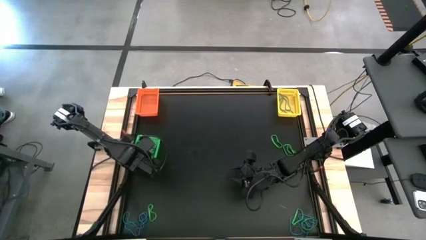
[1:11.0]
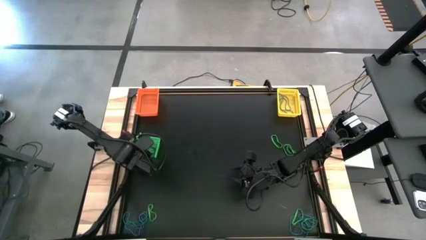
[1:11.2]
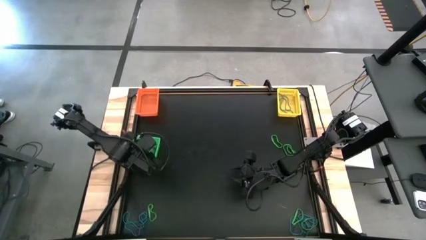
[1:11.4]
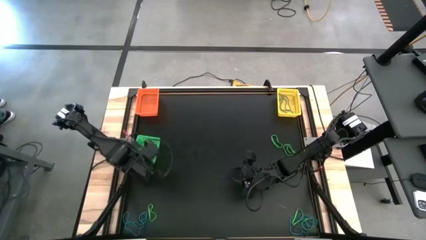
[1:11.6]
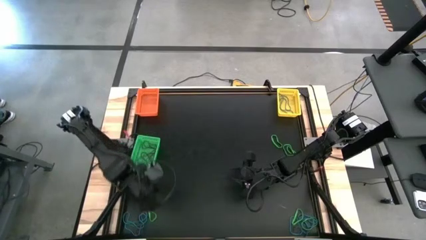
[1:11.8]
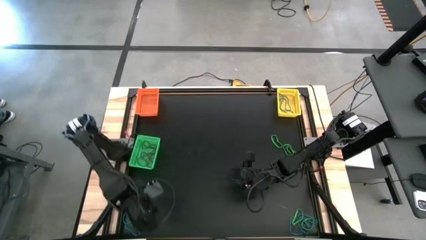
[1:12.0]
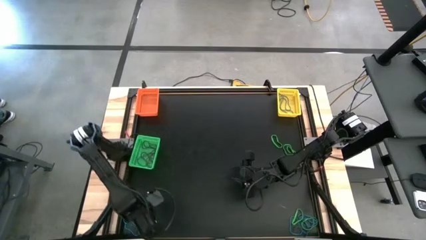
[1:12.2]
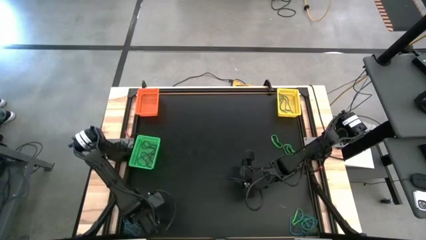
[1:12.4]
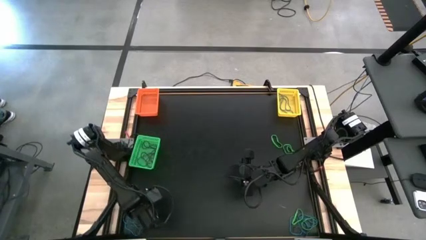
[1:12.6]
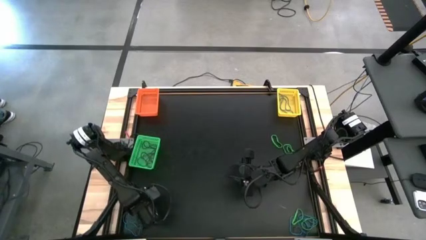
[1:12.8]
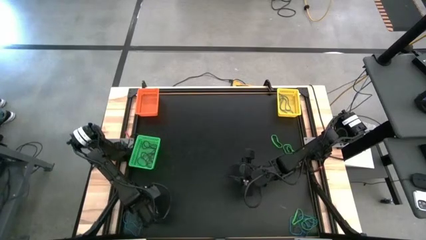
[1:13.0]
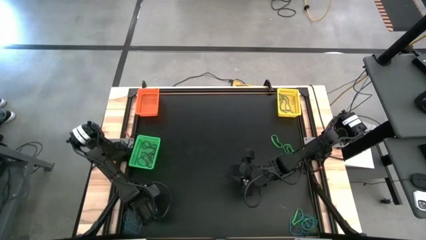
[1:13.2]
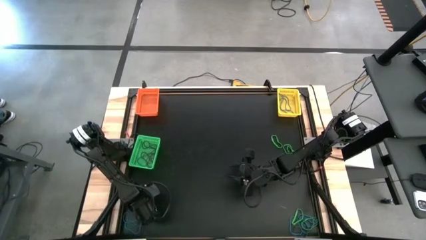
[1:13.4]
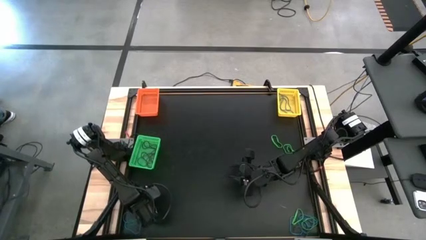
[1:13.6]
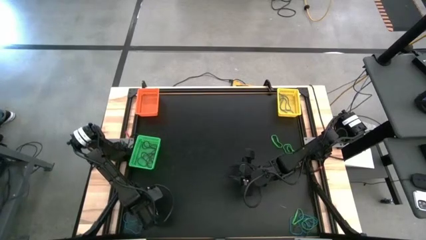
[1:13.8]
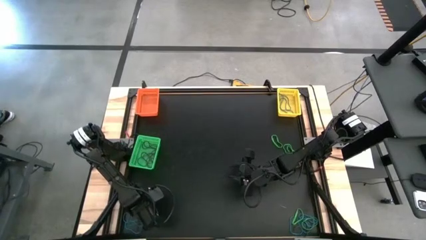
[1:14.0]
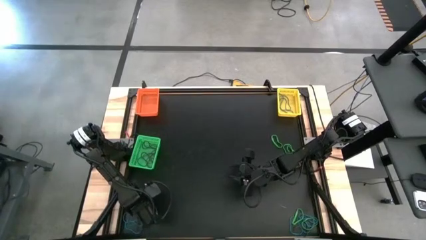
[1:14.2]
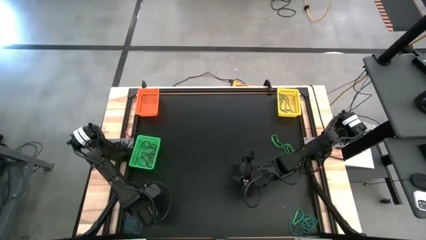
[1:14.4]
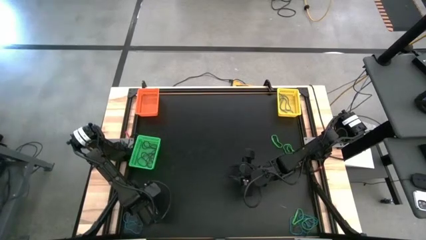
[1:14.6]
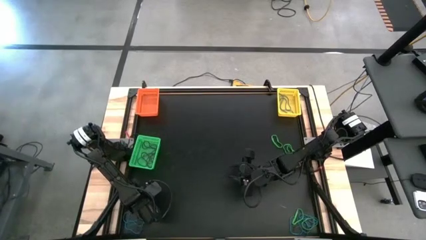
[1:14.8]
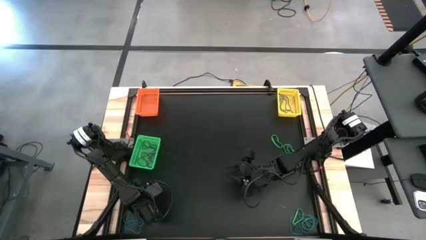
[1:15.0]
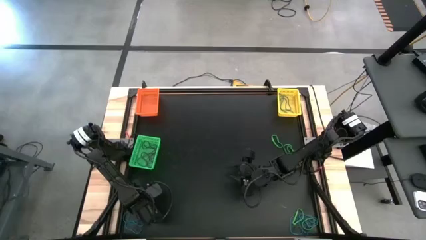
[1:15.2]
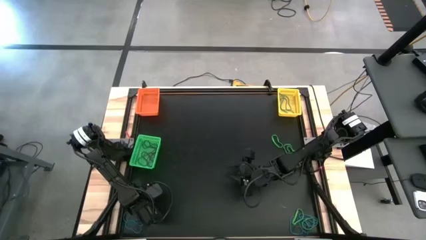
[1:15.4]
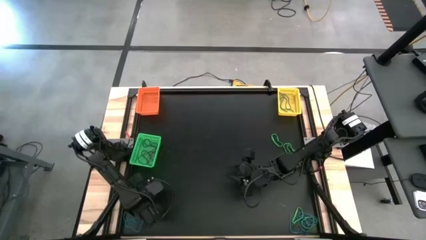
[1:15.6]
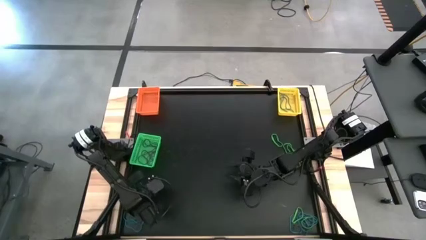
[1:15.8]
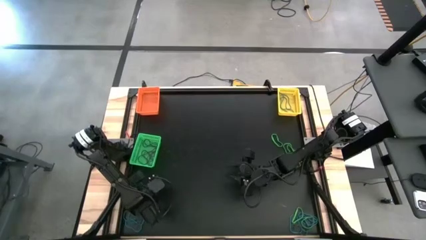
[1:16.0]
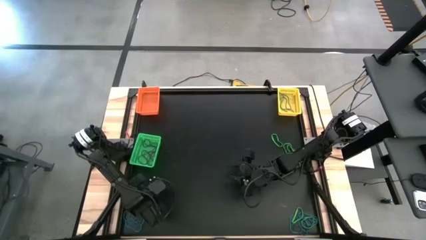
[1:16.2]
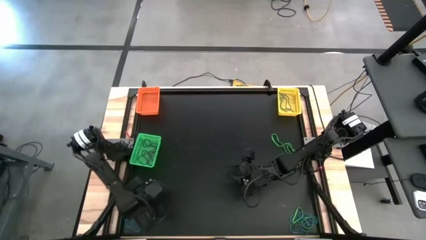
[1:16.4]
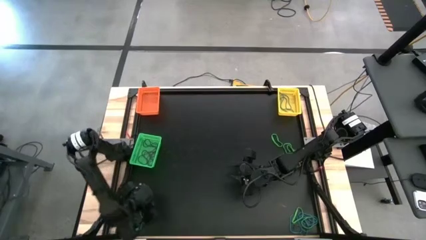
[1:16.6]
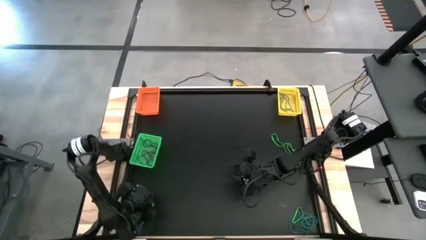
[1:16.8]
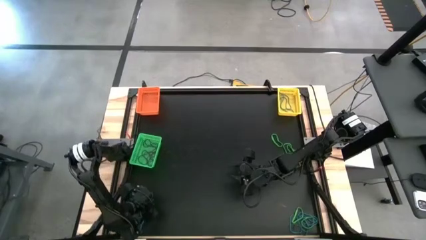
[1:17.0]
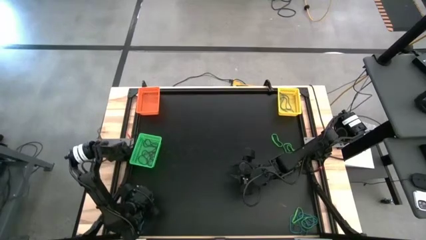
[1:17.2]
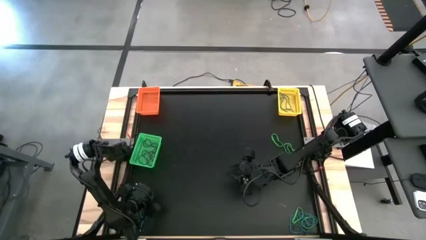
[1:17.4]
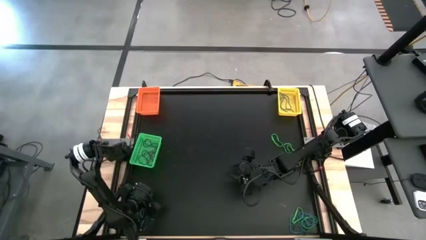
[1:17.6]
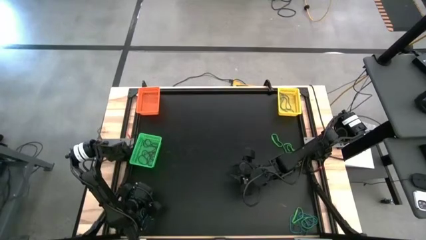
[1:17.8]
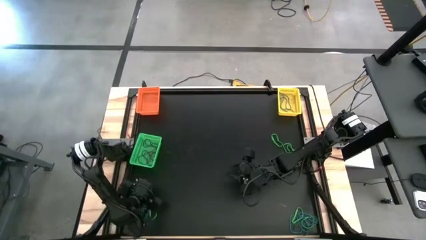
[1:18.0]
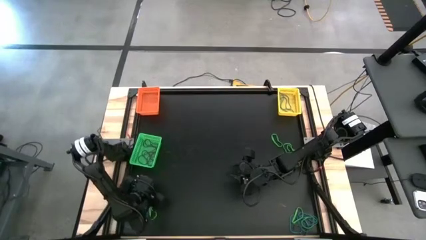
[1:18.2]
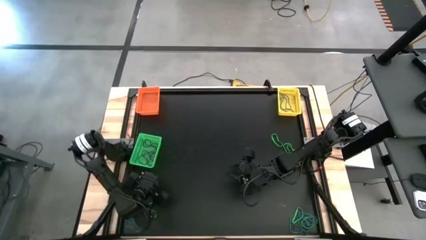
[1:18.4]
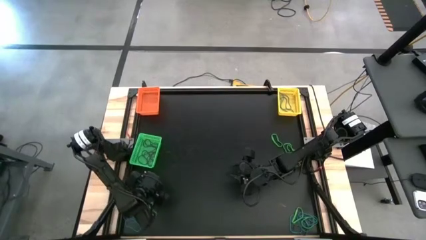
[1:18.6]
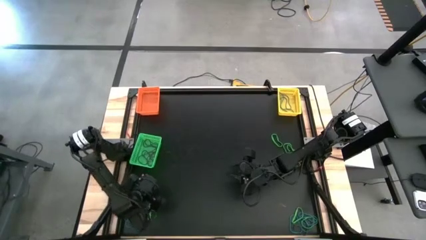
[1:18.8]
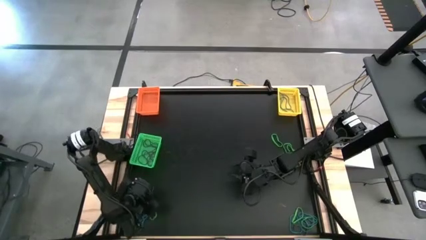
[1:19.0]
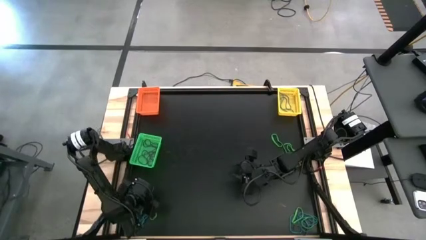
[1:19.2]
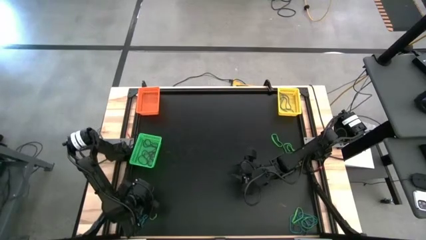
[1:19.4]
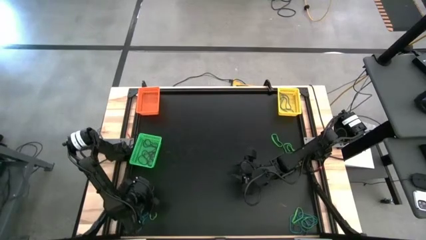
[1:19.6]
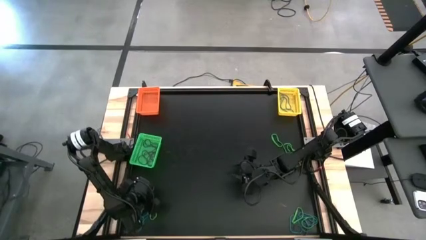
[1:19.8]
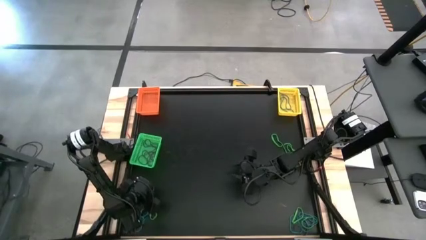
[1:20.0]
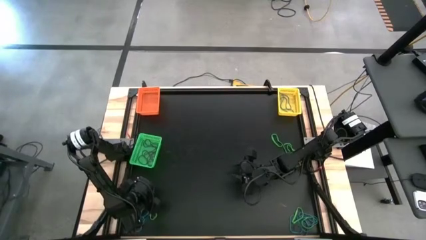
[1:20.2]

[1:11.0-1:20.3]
Task: Sort rubber bands into baskets
Put the bottom left violet rubber band into the green bin

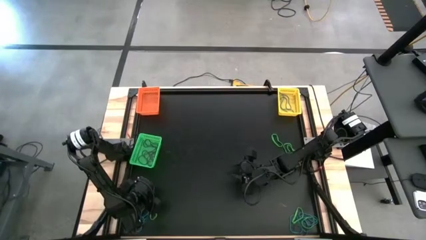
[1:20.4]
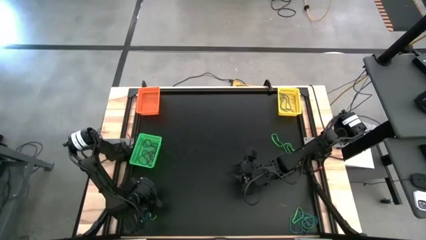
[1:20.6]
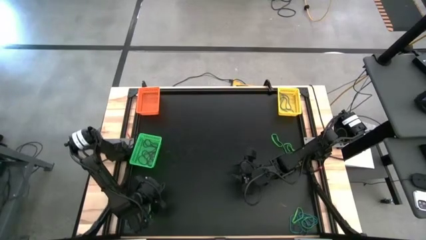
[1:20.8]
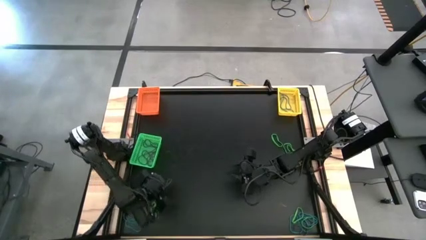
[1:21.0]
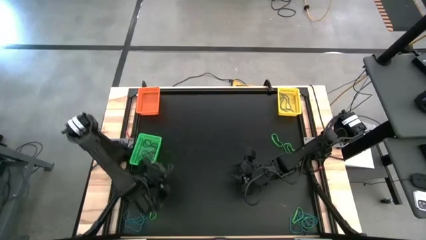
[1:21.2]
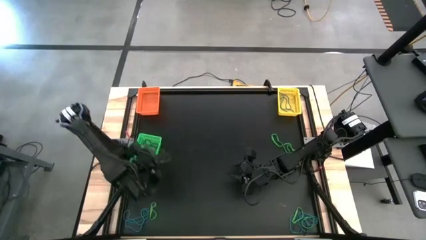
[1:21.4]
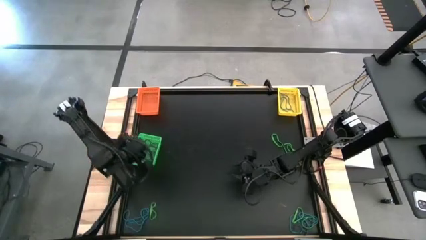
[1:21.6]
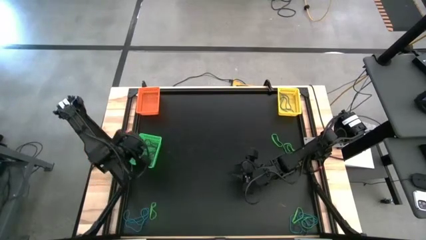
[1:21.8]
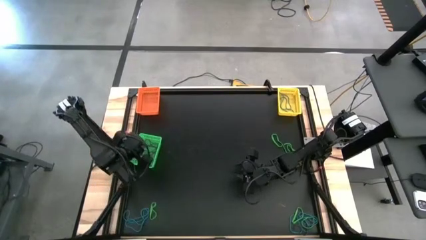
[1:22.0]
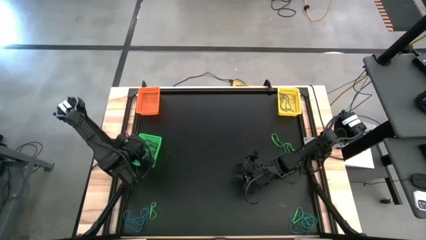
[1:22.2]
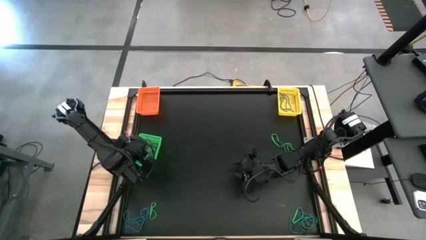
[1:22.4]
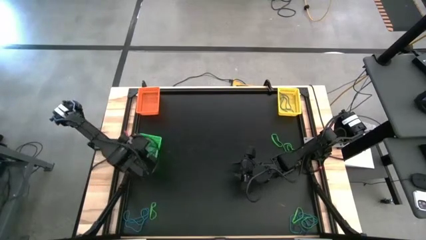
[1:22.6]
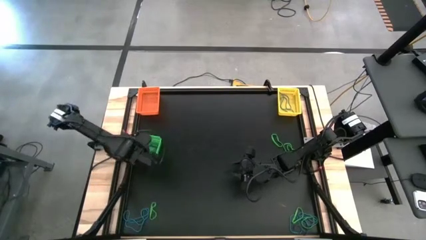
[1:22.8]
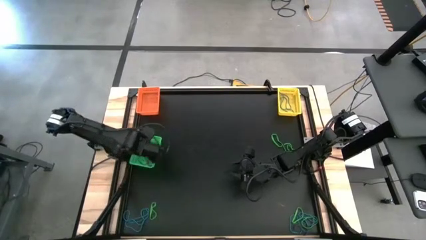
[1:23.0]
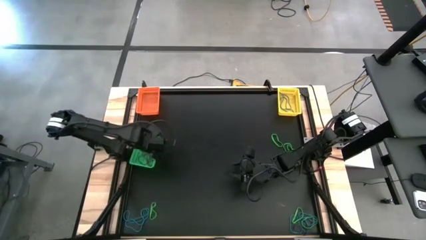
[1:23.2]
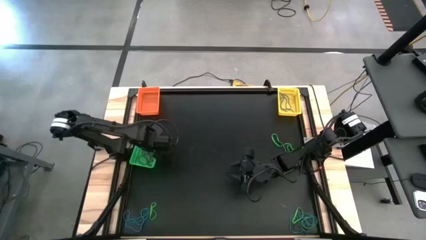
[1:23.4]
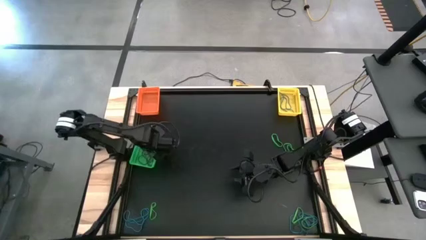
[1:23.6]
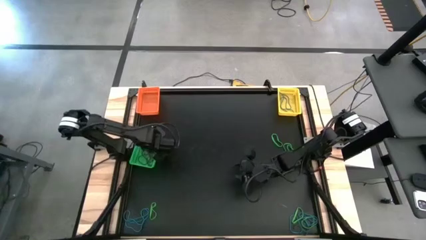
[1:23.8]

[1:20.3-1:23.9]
Put the bottom left violet rubber band into the green bin

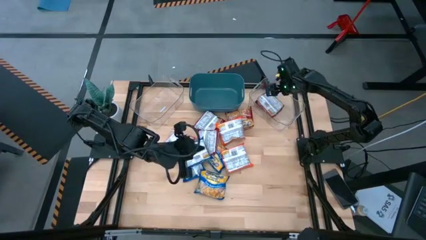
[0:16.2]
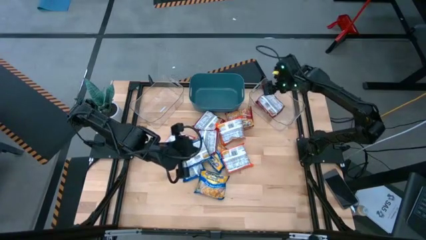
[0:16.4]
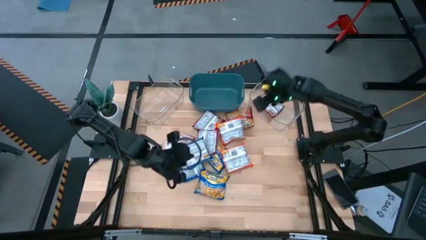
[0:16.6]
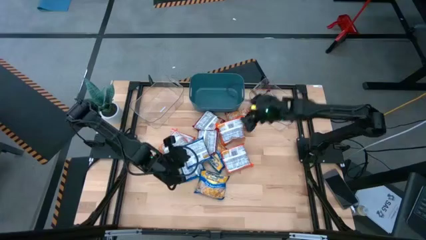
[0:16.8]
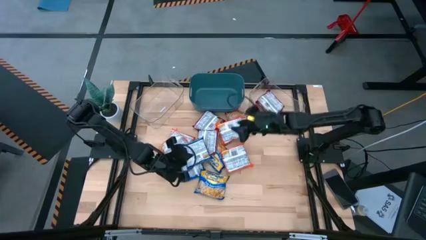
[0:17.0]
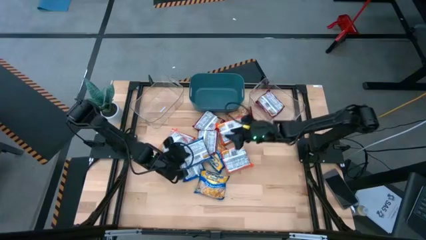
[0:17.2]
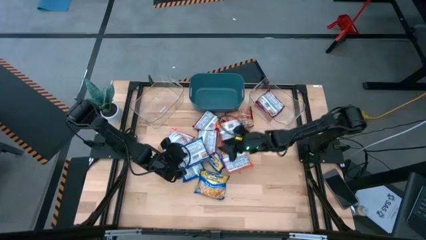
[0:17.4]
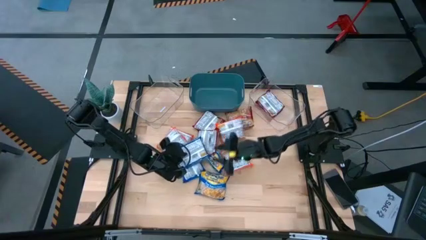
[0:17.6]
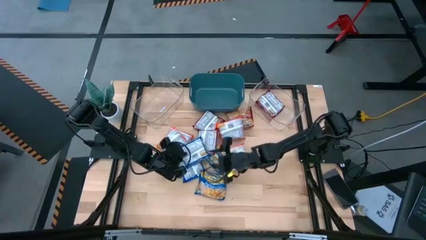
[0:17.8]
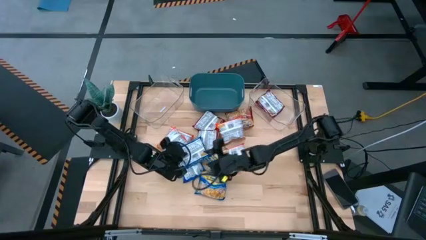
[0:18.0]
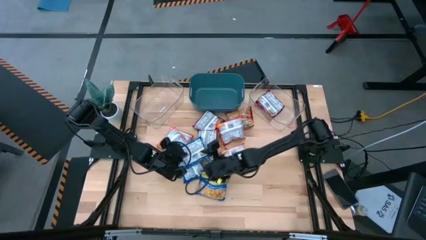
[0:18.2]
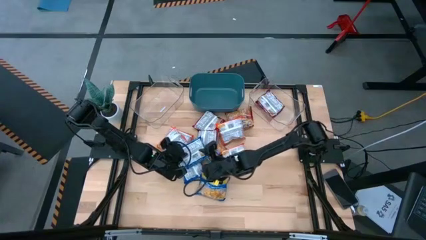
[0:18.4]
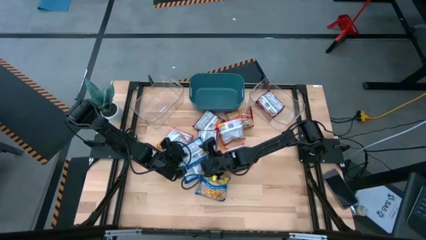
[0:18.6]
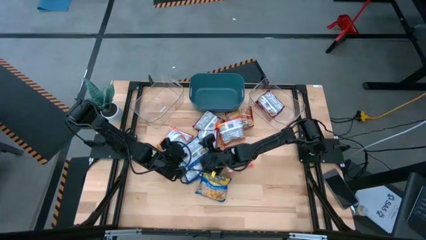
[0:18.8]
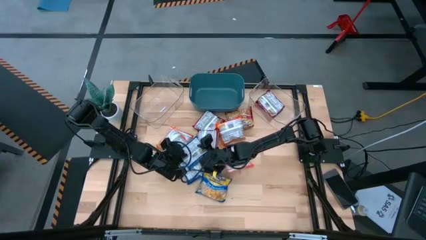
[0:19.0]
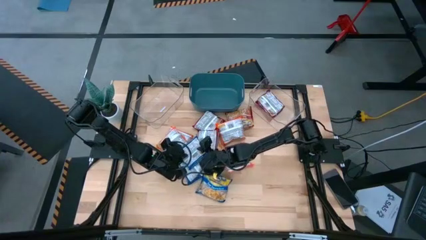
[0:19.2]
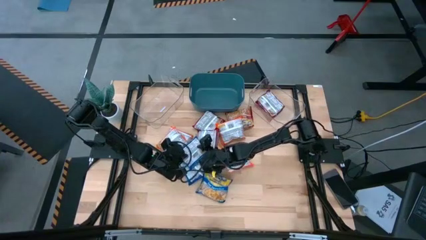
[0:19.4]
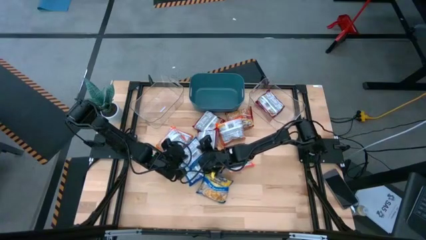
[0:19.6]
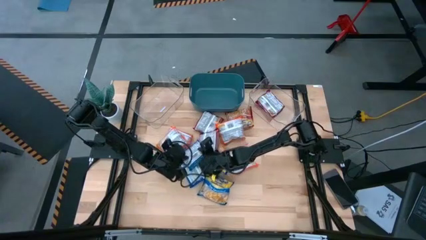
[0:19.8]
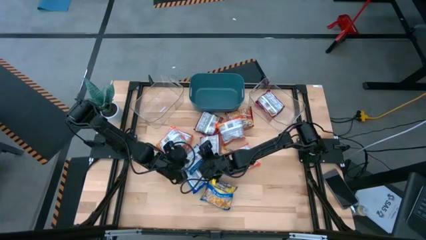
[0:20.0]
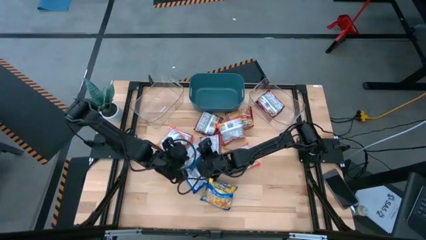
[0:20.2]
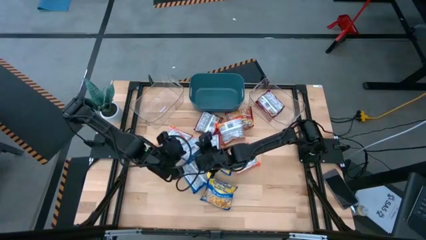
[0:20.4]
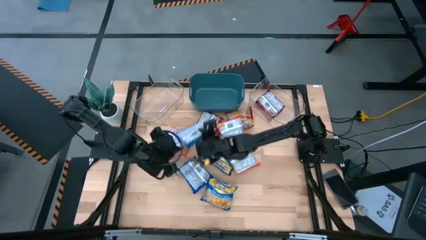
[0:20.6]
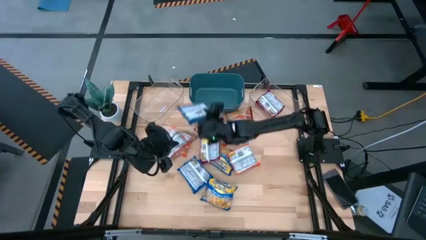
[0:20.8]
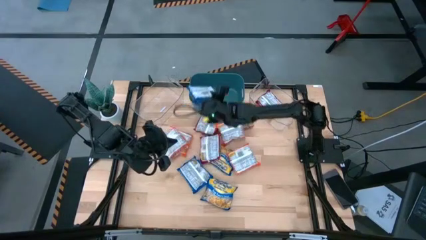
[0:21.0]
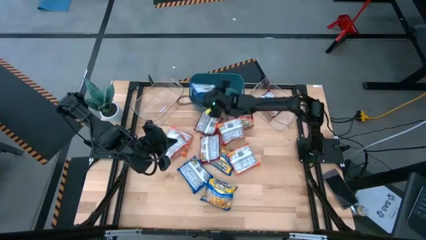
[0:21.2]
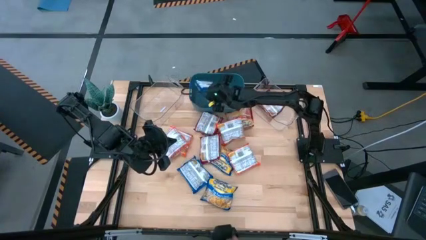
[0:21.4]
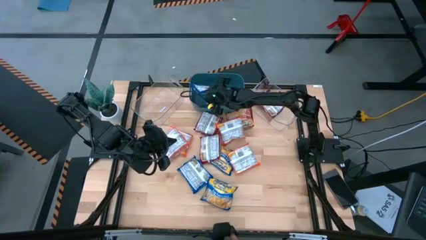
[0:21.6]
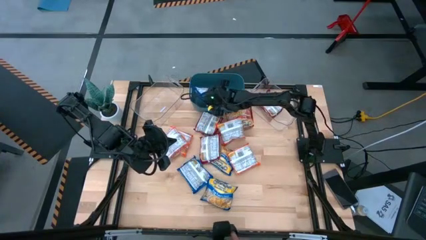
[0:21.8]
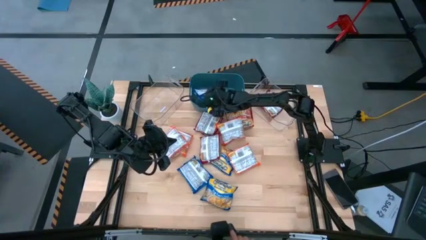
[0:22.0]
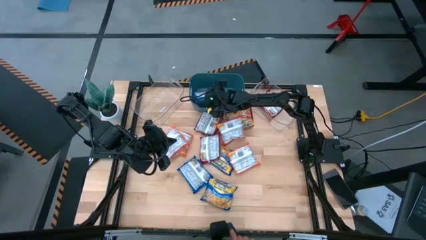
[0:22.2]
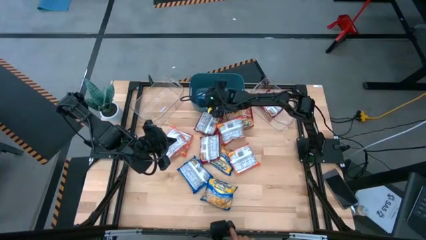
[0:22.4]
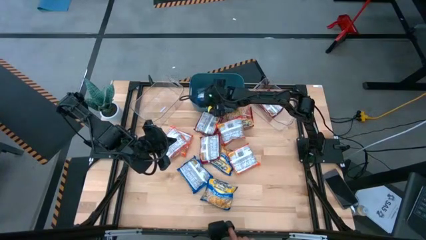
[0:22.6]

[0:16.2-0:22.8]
Task: Sort Maruchan noodles
Put the blue noodle pack into the blue bin
